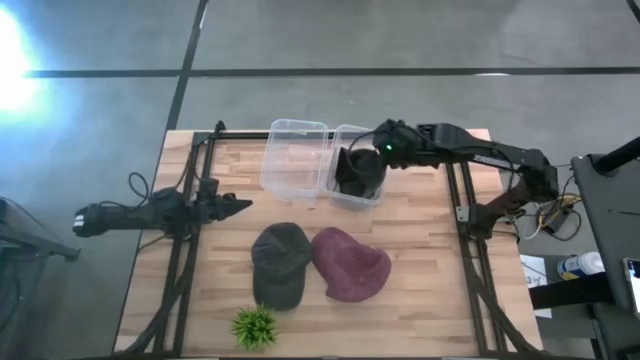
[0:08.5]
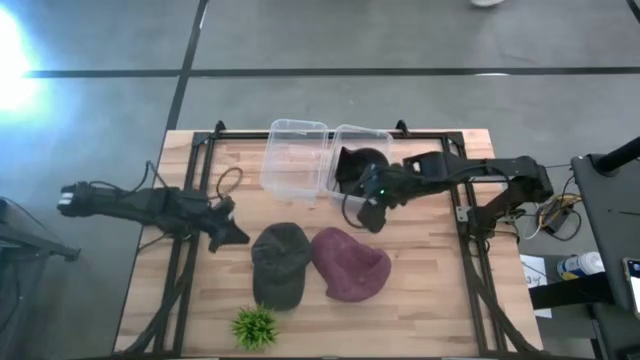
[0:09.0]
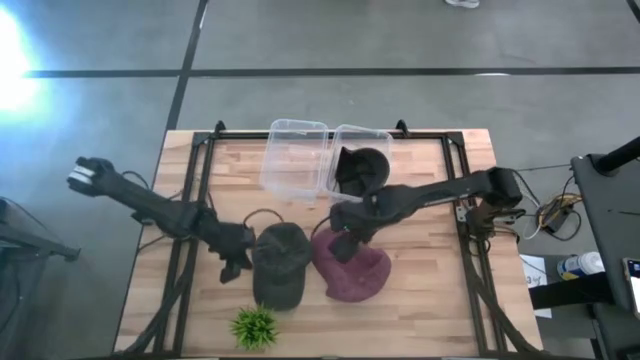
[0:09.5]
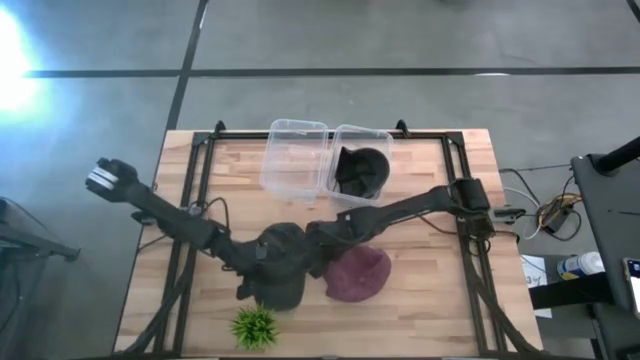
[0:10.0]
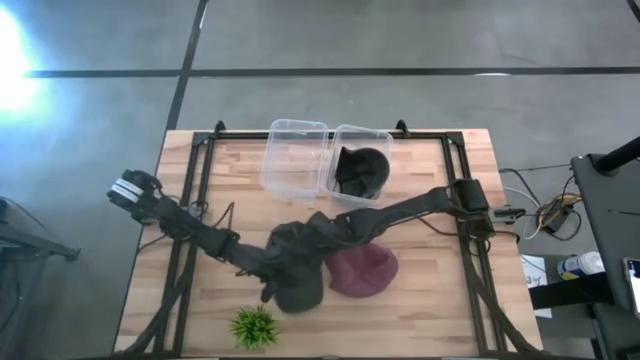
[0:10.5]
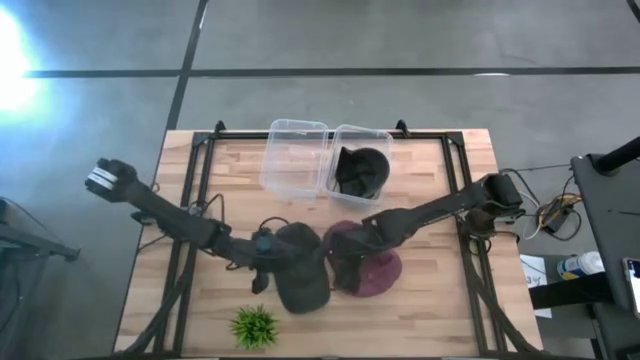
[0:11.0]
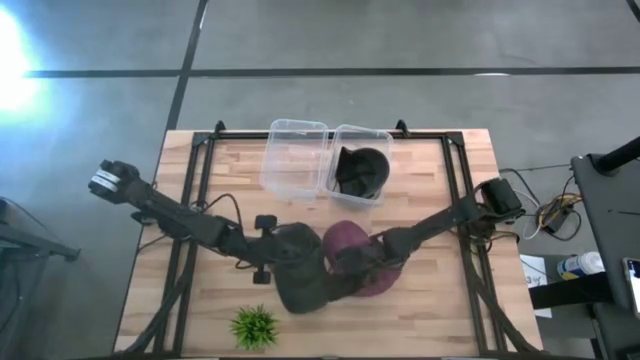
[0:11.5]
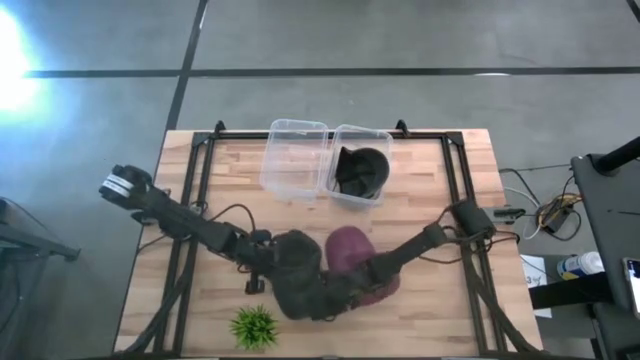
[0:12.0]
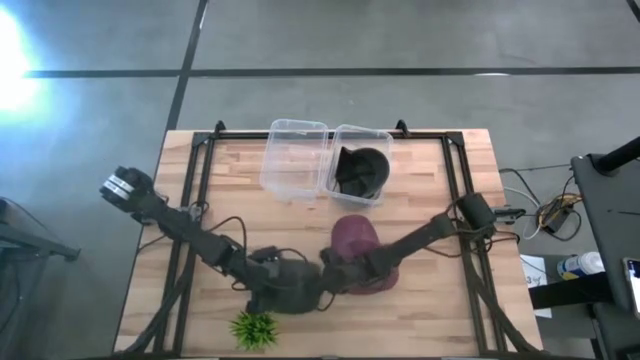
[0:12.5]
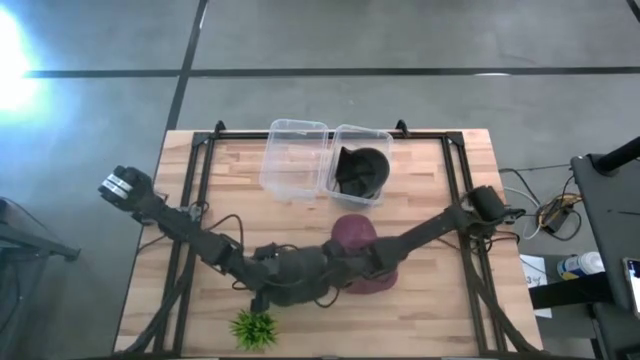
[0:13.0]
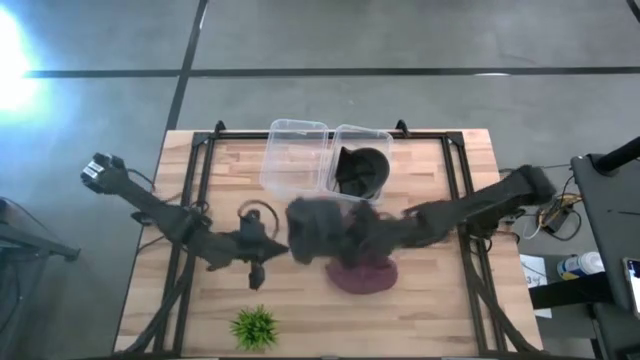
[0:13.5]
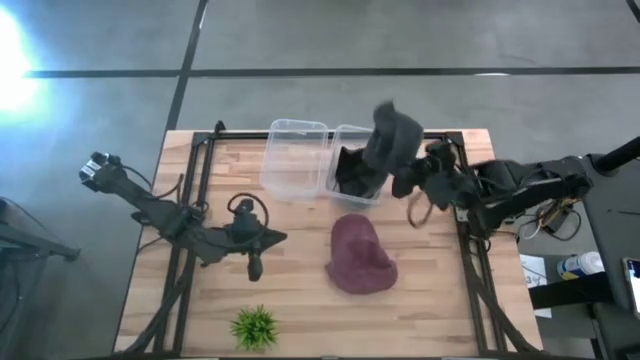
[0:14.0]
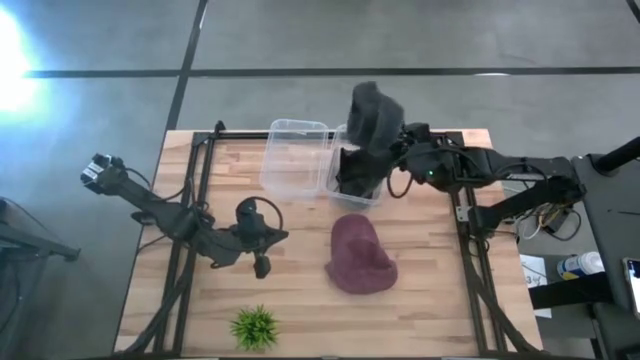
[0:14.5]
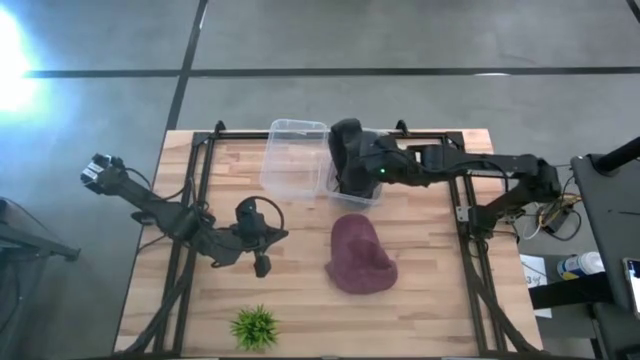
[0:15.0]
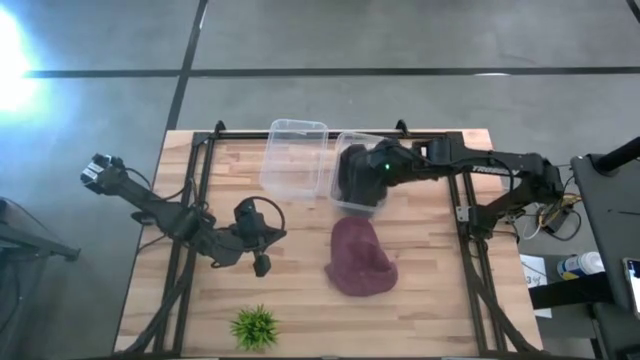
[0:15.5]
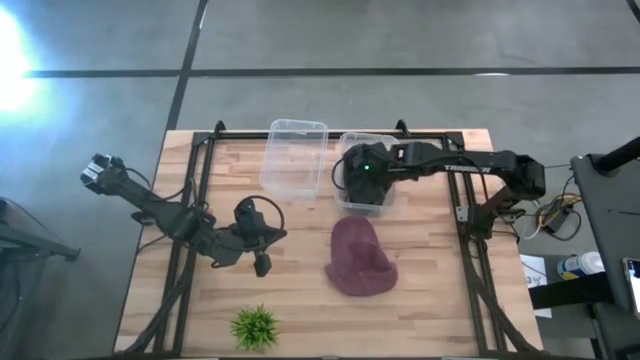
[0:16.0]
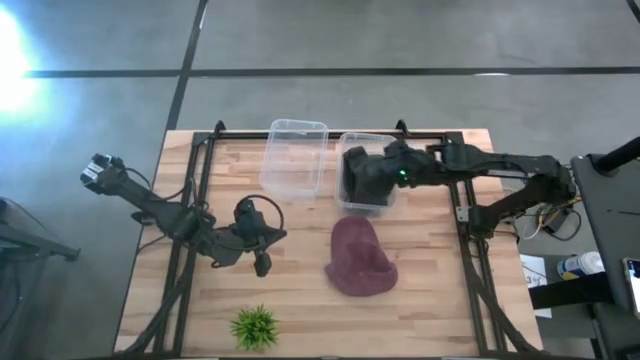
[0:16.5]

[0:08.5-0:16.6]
Task: Pick and place caps into container
Put the black cap into the right transparent container

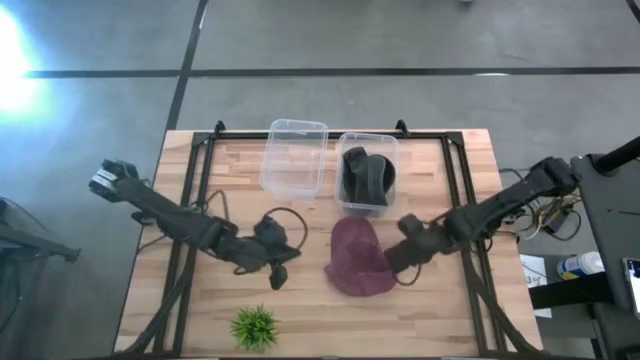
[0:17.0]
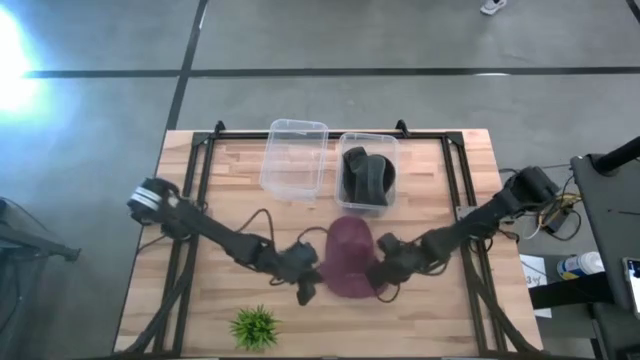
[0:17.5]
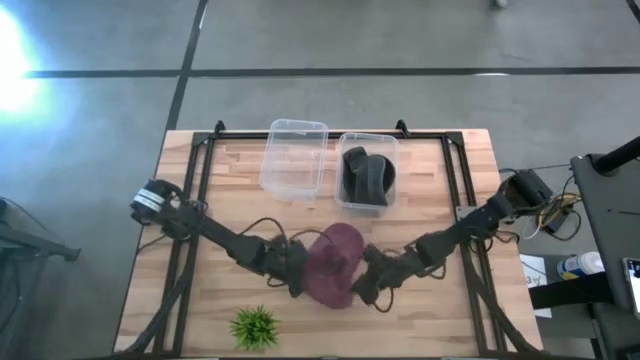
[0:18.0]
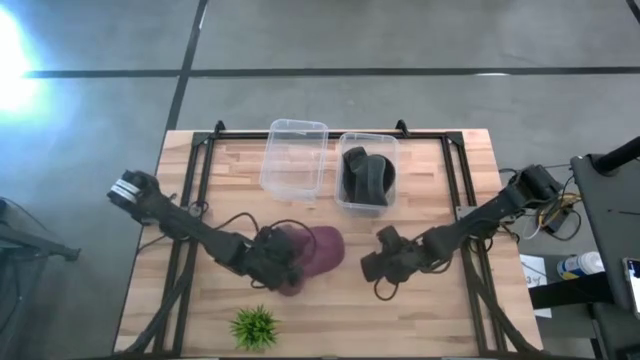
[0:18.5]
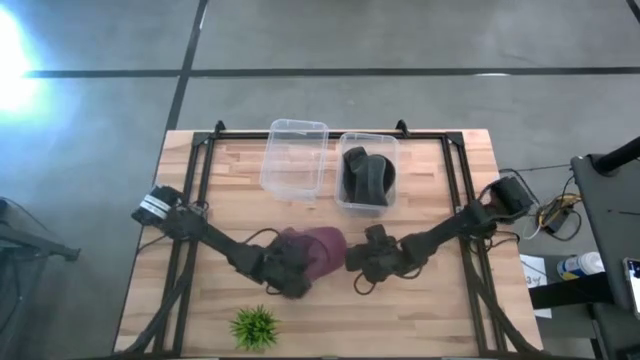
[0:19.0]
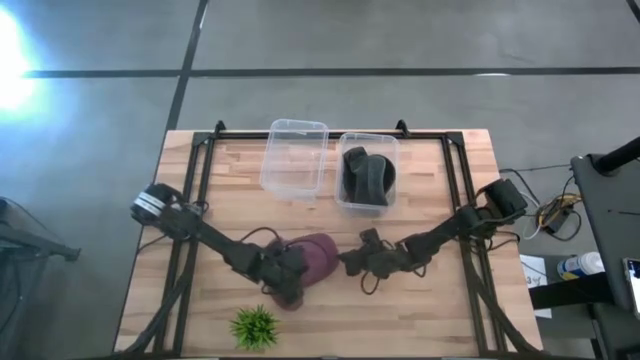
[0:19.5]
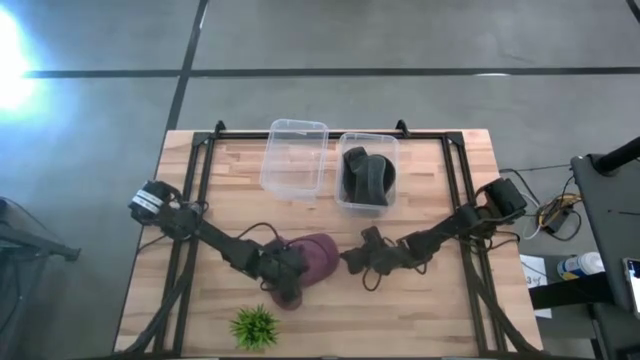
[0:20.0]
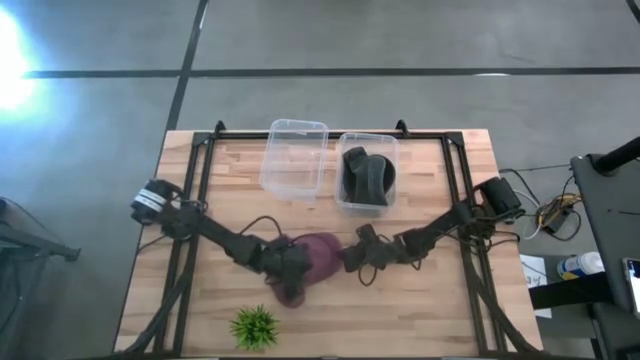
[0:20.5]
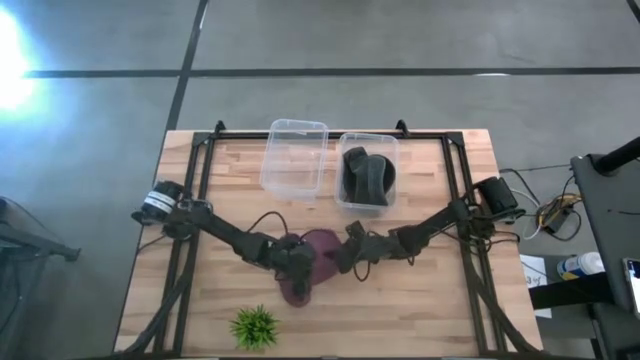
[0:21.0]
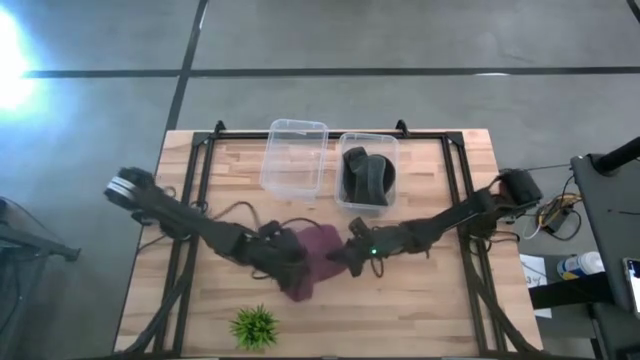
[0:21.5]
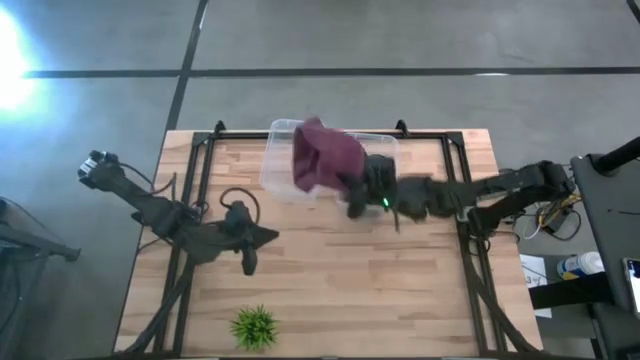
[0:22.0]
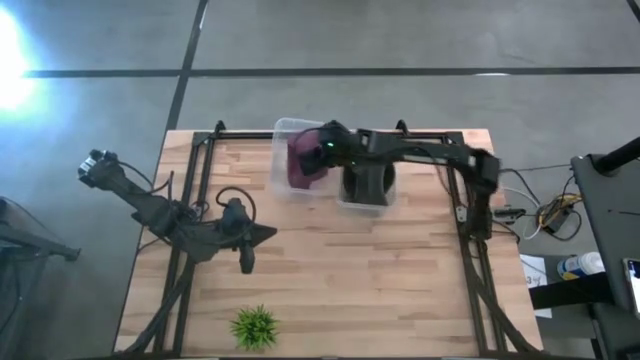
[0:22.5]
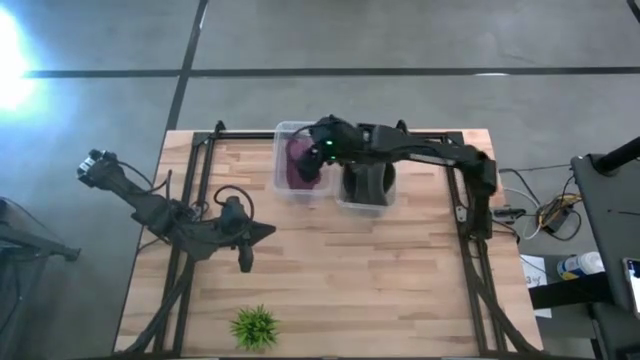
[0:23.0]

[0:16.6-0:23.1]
Put the red cap into the left transparent container

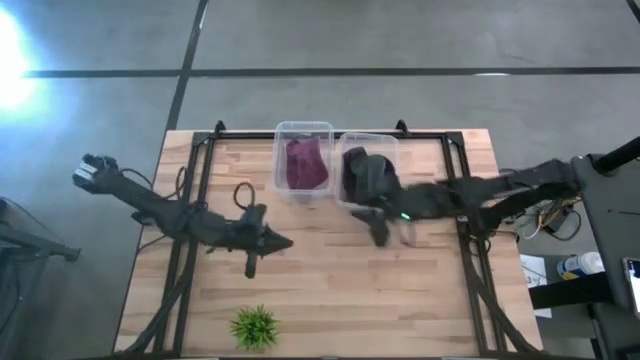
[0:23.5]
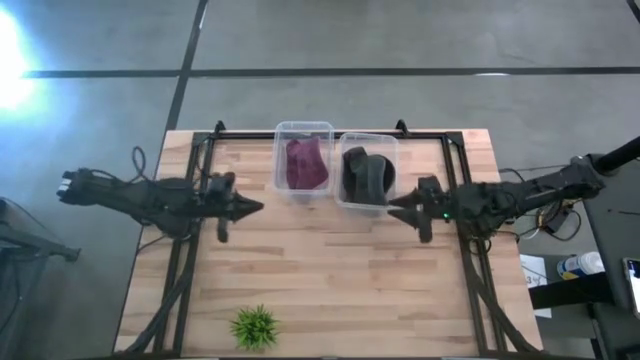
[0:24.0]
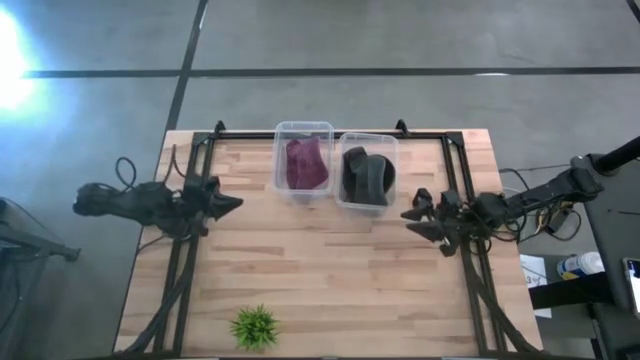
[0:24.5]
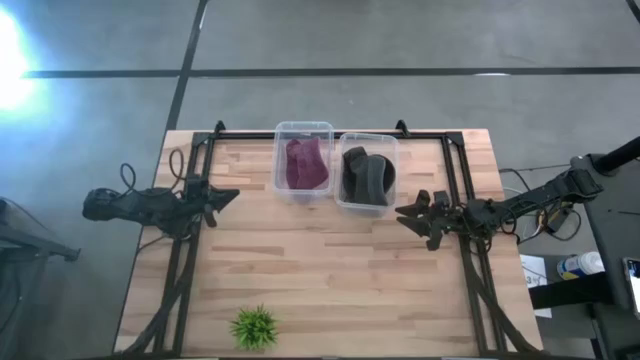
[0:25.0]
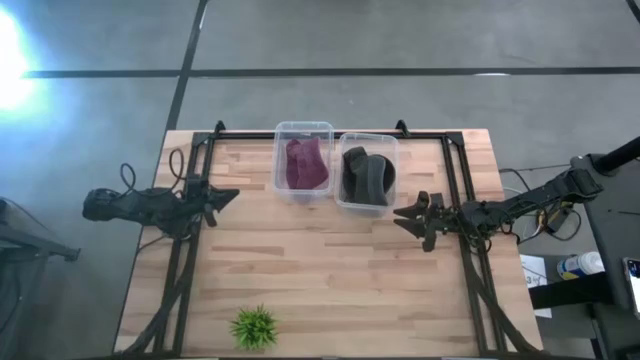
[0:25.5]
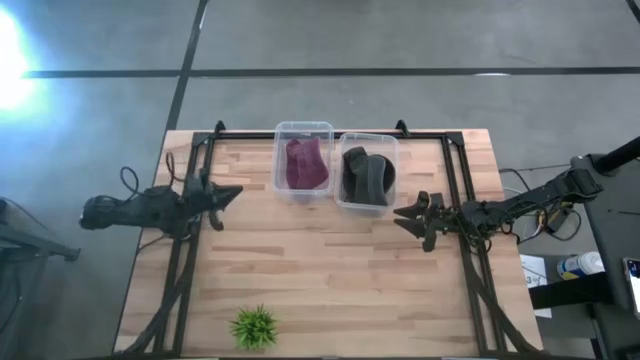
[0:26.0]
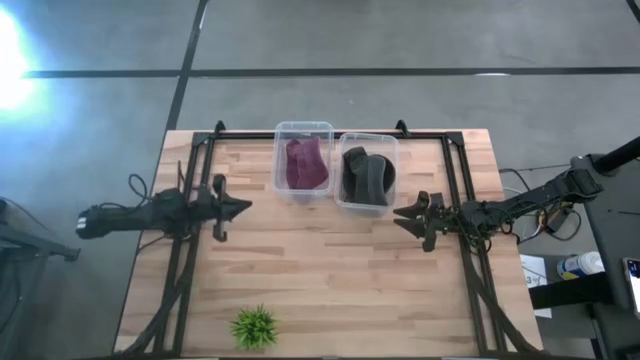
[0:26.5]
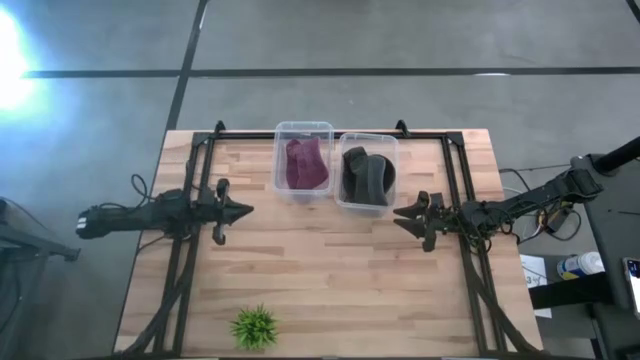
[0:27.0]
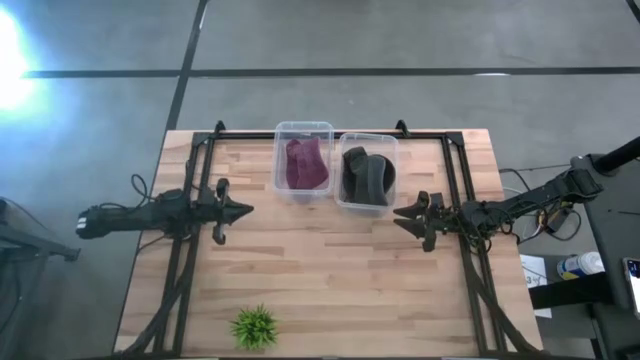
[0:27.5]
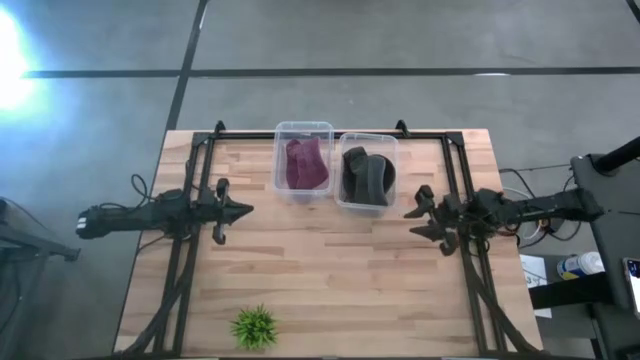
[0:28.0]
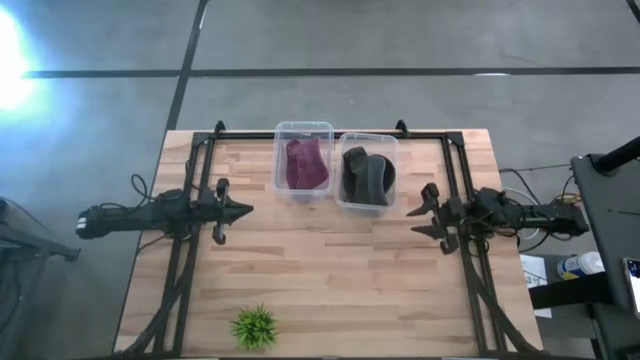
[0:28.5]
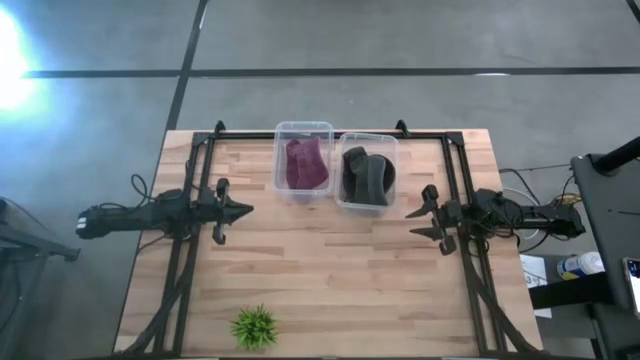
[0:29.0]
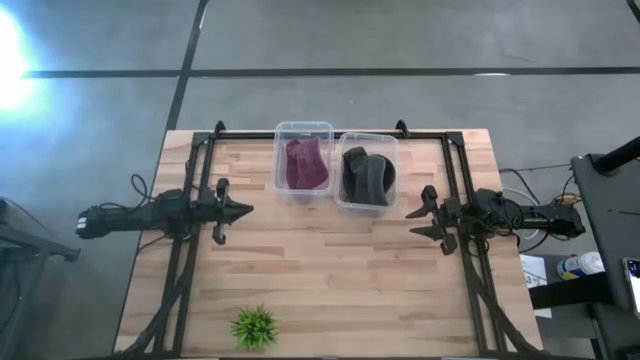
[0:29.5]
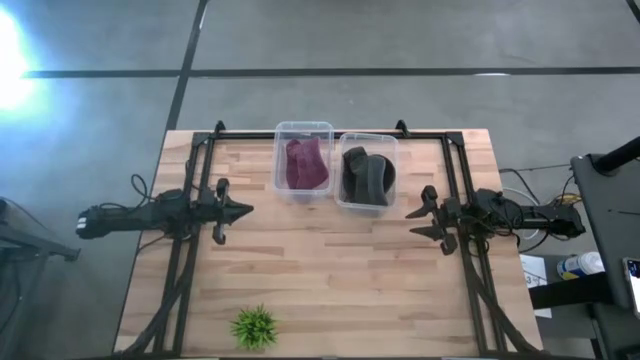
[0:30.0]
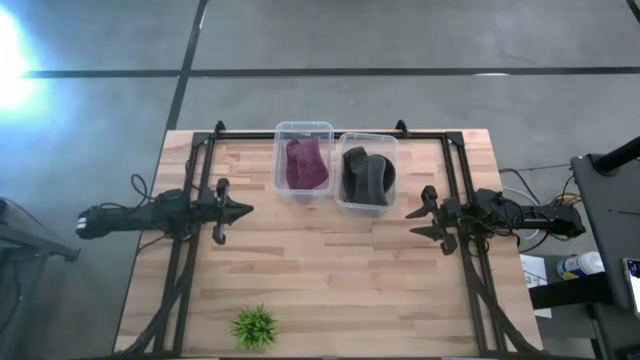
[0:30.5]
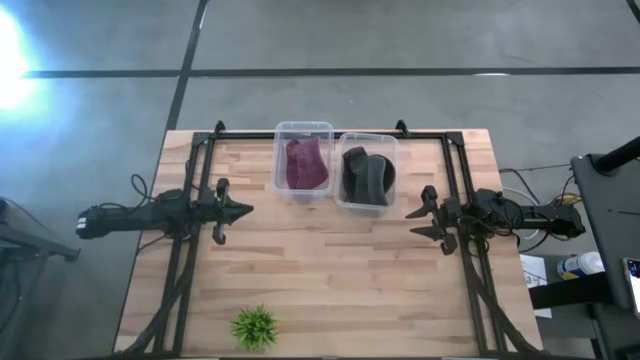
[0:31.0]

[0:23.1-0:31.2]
Return to Home Position
